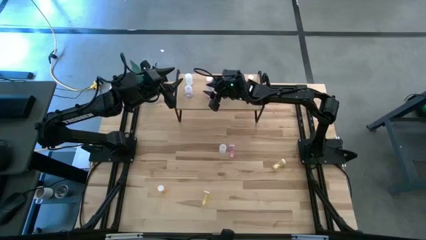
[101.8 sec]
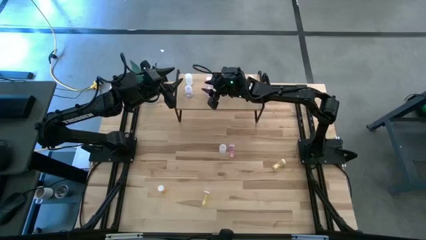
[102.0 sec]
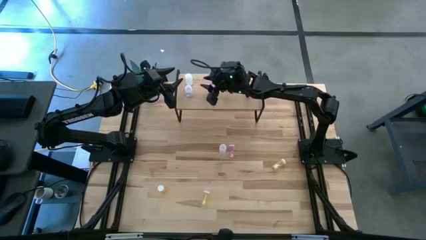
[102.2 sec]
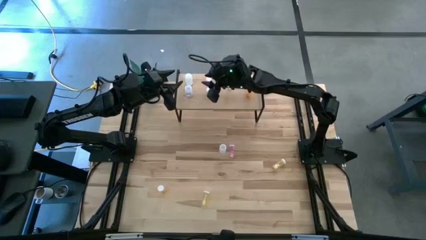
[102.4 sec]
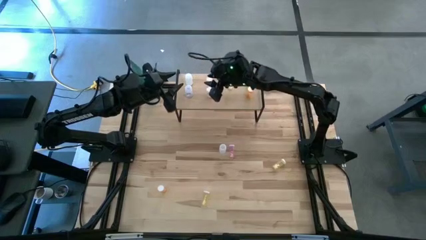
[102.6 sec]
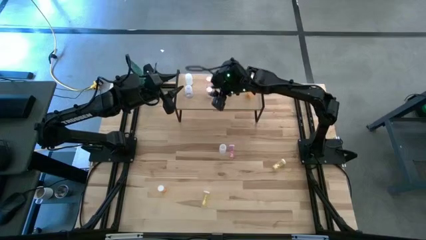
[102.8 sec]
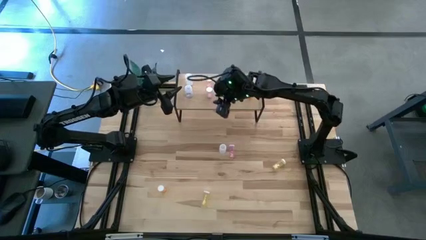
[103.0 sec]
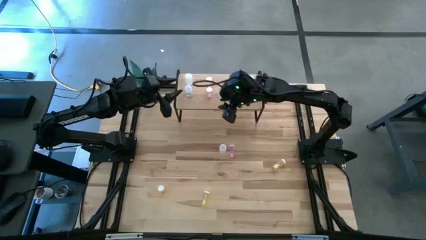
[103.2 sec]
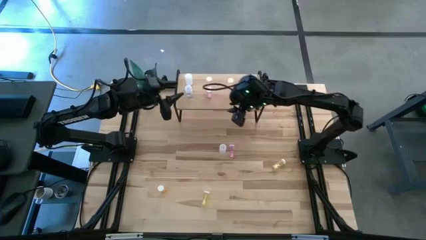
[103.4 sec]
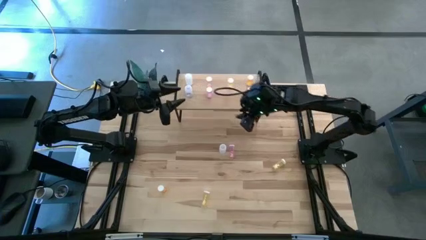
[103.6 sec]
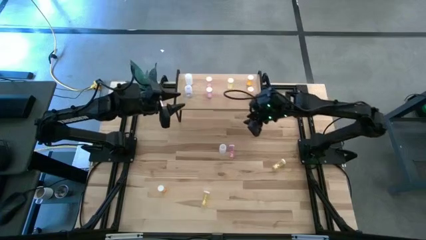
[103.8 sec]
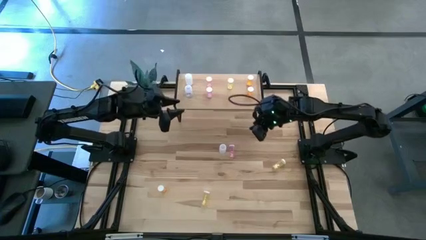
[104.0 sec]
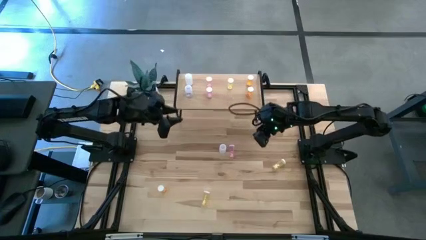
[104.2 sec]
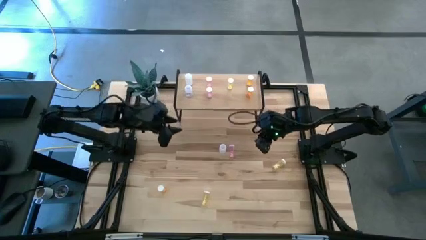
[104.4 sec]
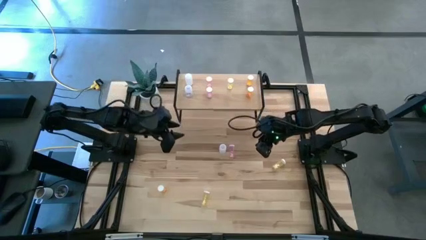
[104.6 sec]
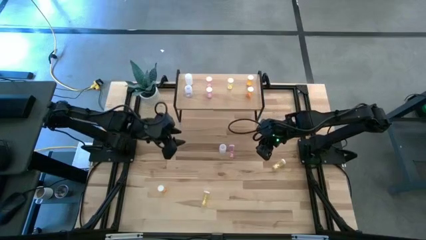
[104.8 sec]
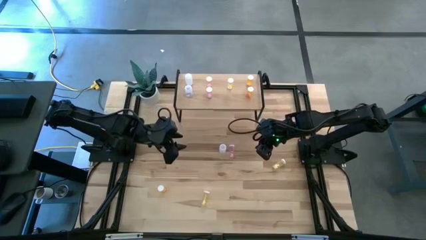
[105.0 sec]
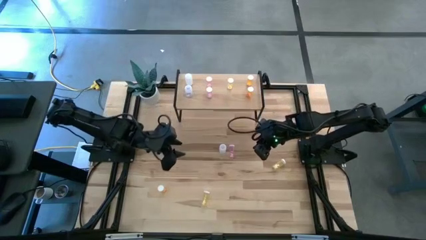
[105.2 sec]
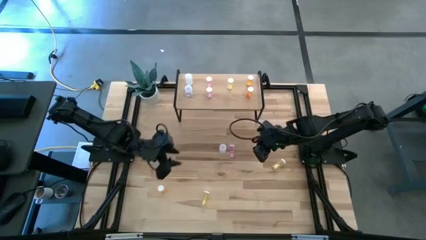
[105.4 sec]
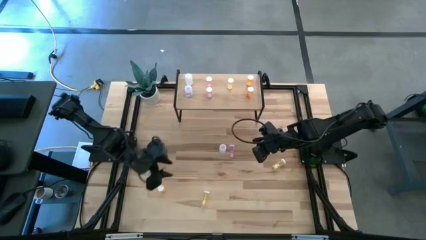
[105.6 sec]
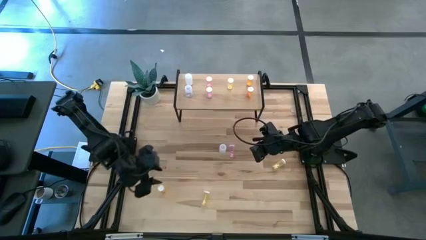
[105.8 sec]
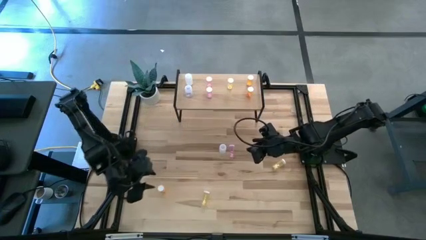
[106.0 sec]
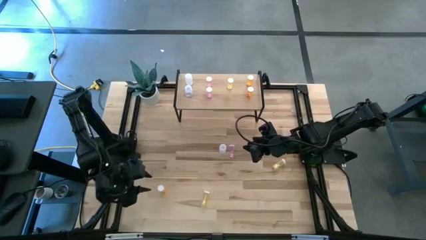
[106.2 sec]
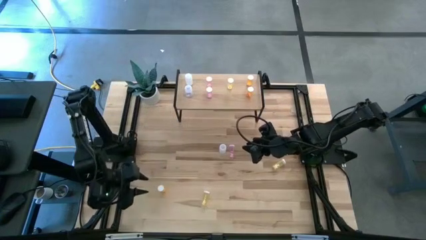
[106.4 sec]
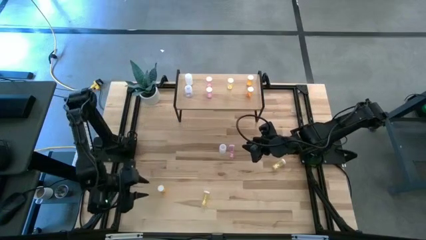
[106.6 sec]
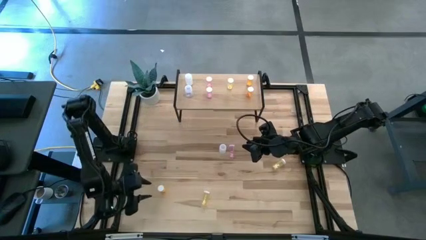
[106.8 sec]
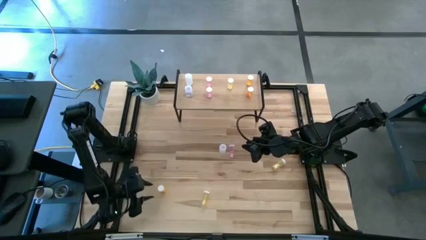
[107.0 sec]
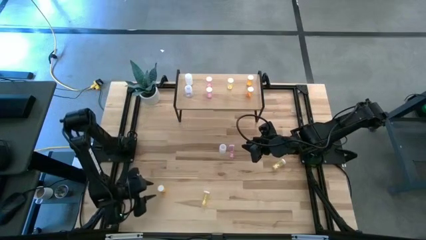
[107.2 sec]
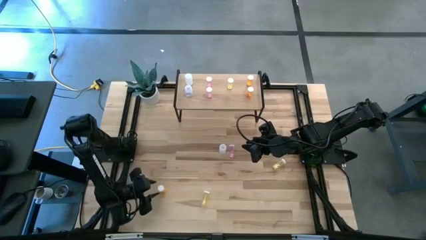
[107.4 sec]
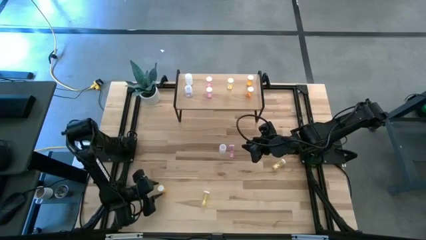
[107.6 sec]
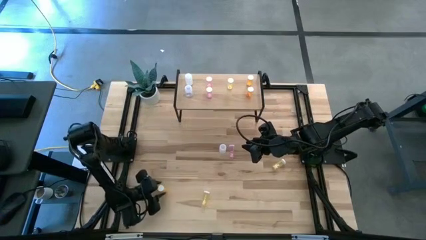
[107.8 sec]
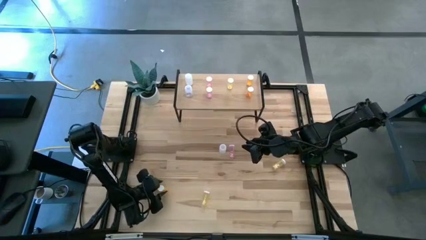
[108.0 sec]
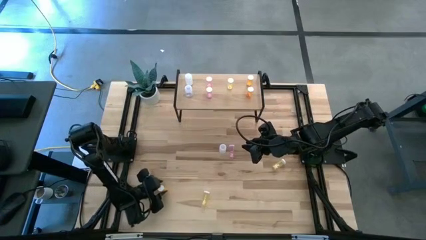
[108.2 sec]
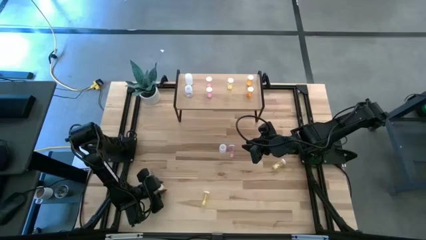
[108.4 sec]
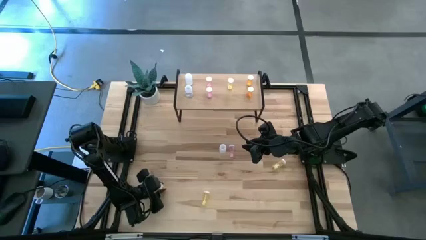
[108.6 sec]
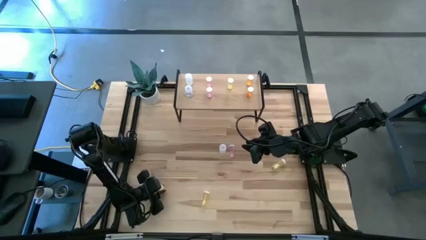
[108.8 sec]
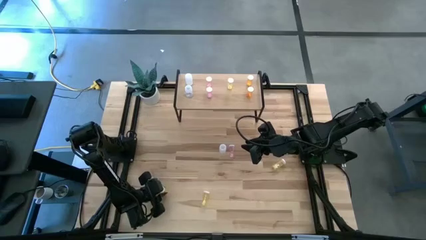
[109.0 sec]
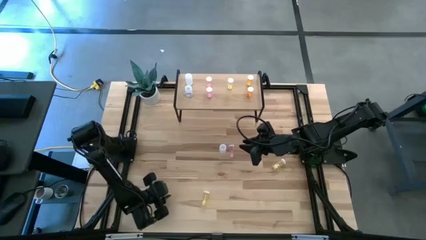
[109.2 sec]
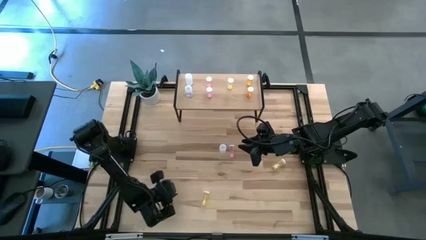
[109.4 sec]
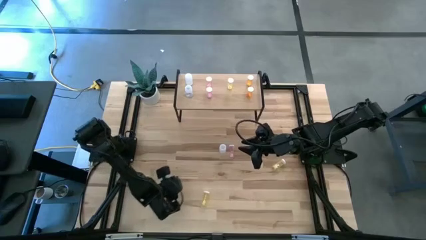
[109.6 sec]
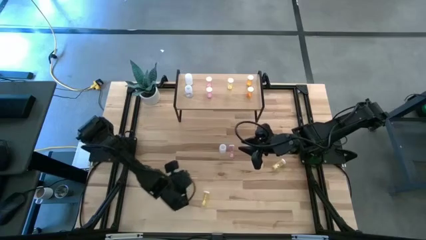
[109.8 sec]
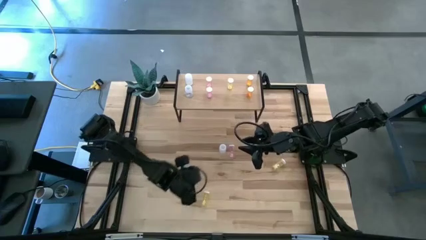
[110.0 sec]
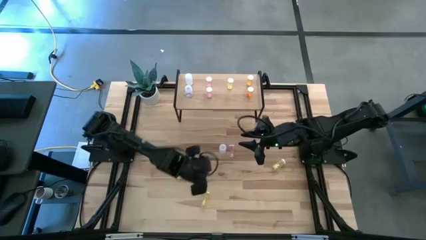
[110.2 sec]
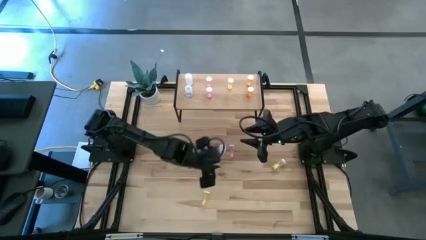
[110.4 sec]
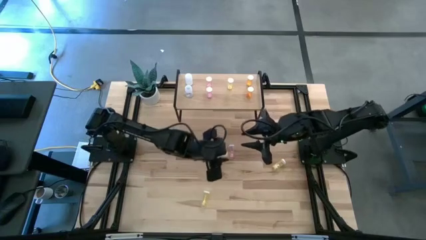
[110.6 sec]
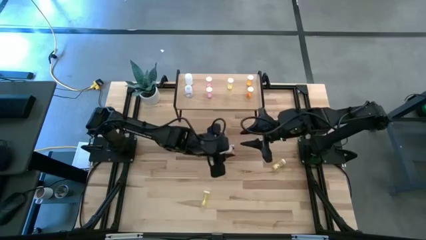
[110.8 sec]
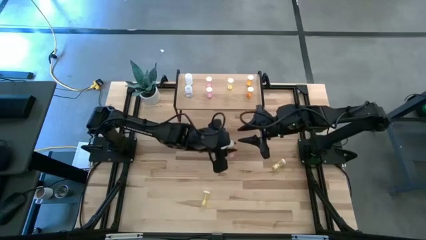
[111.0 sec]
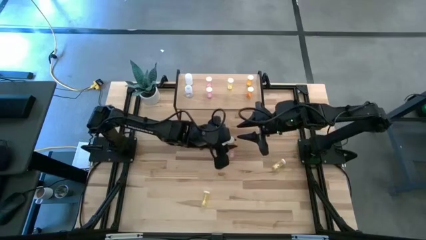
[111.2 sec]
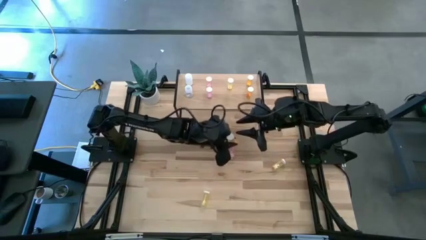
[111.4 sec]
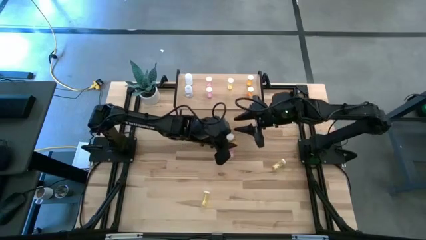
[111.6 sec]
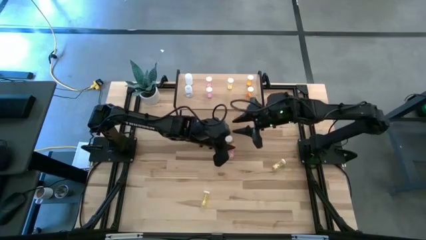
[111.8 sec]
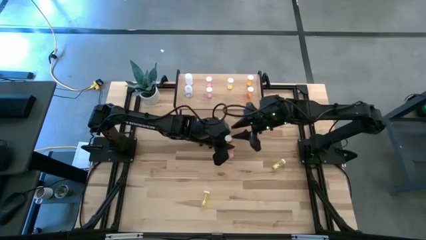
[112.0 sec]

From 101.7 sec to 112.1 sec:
Task: Pick and place medicine bottles onto shelf by color
Put the orange pill bottle aligned with the other orange pill bottles on the shelf
